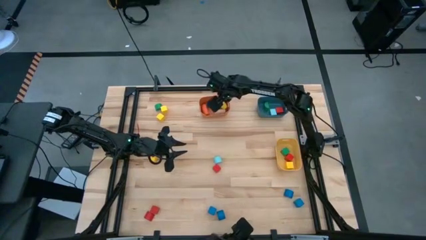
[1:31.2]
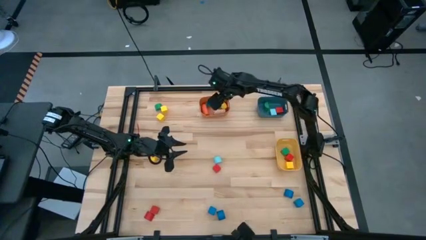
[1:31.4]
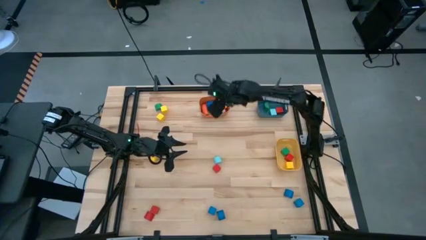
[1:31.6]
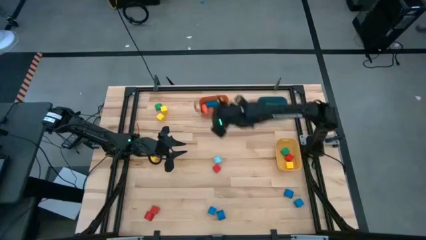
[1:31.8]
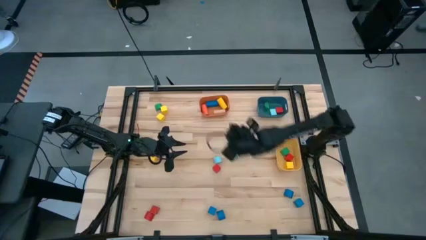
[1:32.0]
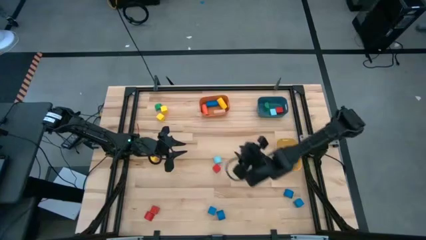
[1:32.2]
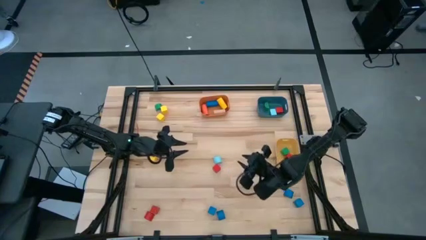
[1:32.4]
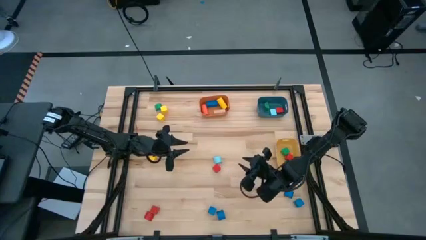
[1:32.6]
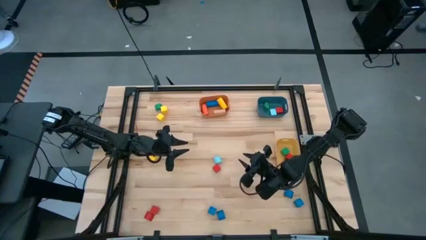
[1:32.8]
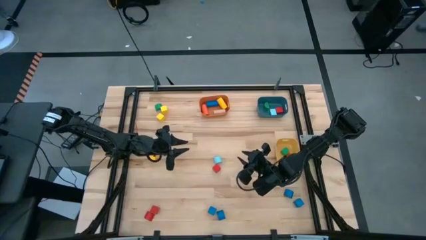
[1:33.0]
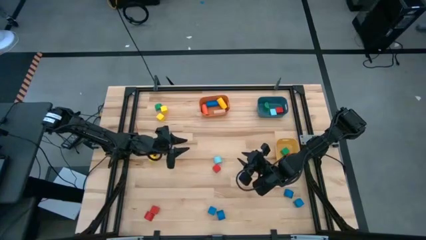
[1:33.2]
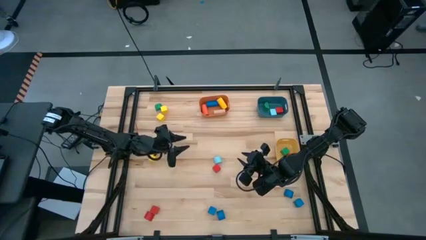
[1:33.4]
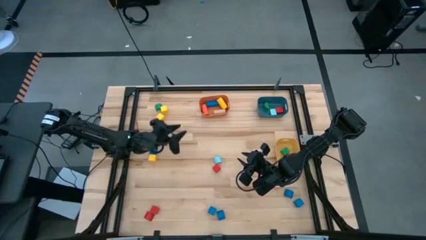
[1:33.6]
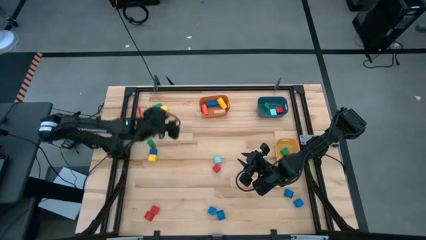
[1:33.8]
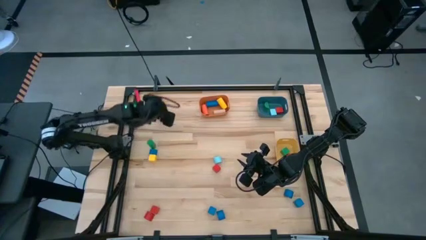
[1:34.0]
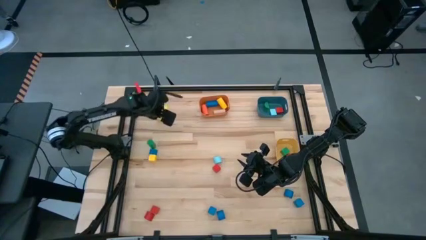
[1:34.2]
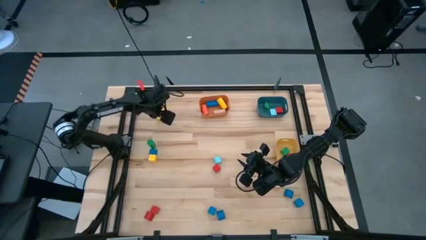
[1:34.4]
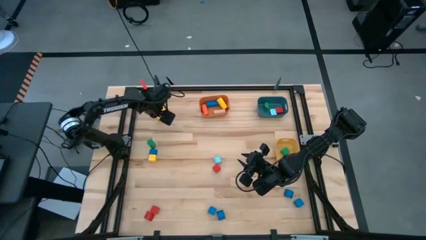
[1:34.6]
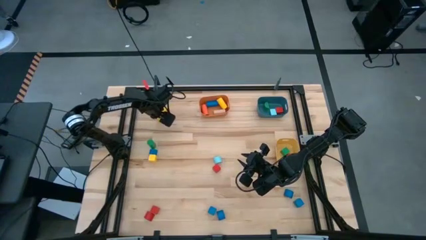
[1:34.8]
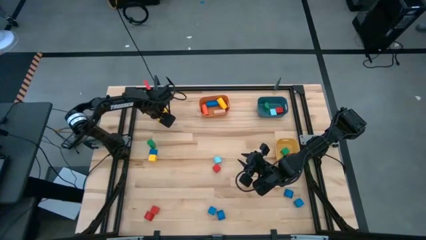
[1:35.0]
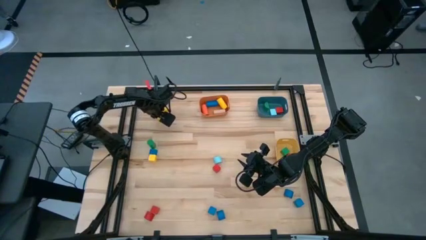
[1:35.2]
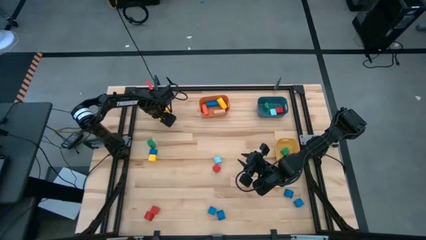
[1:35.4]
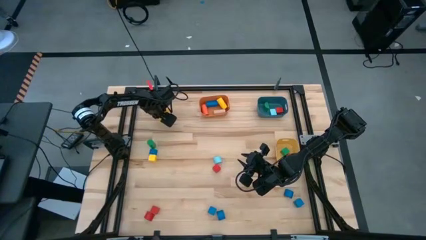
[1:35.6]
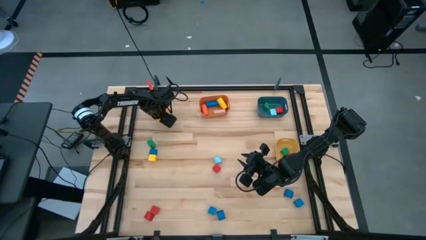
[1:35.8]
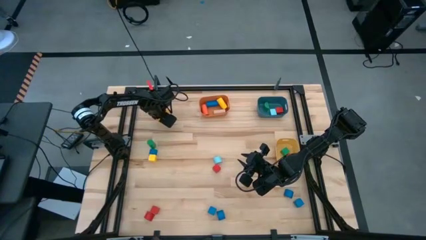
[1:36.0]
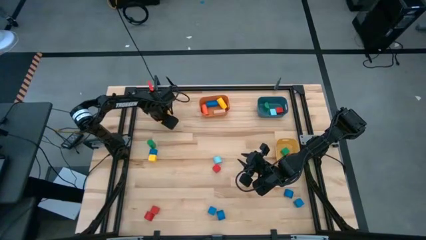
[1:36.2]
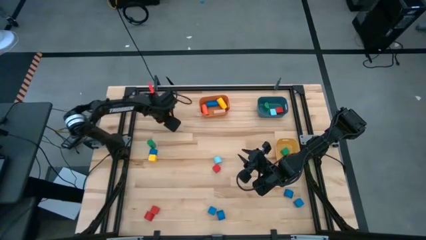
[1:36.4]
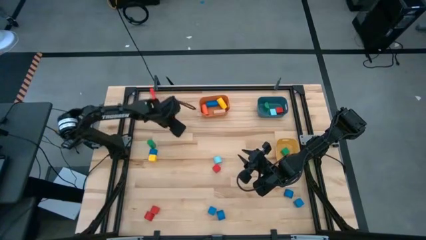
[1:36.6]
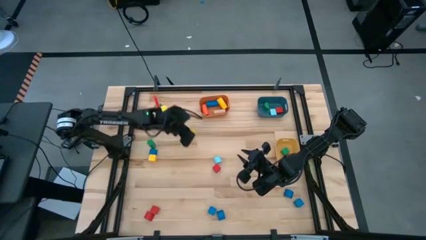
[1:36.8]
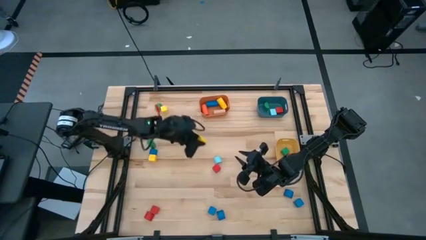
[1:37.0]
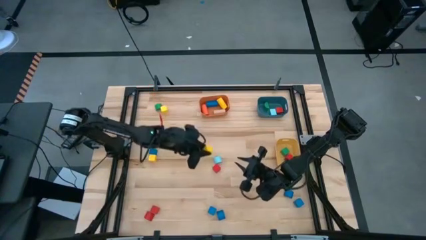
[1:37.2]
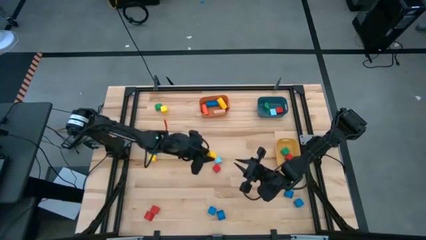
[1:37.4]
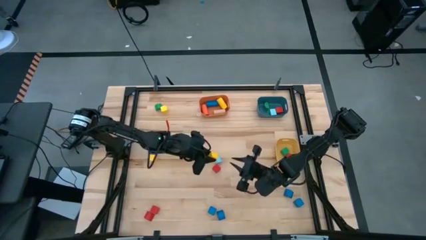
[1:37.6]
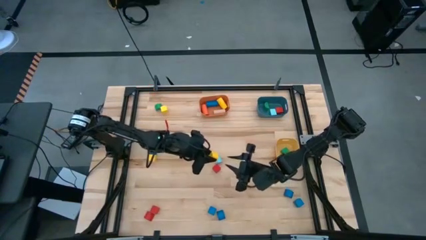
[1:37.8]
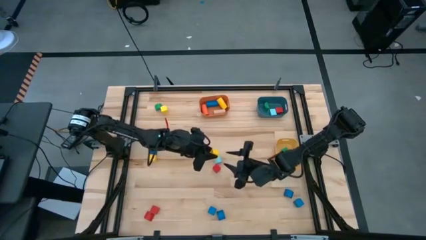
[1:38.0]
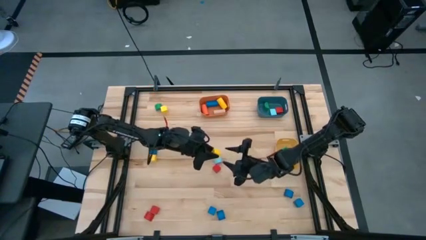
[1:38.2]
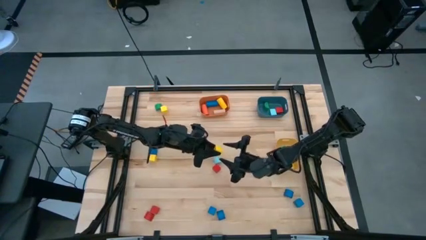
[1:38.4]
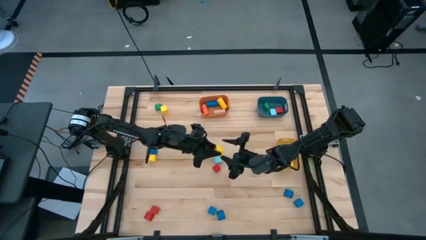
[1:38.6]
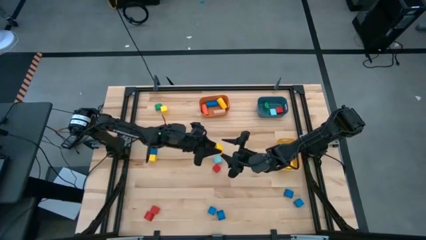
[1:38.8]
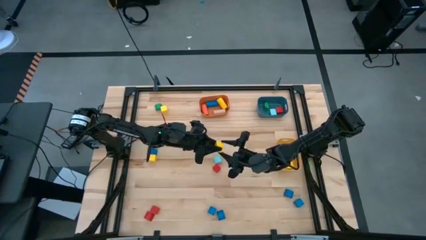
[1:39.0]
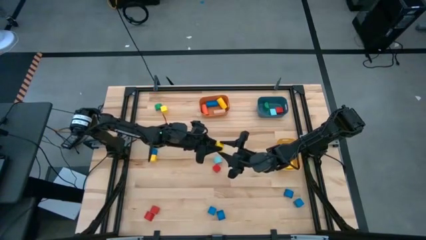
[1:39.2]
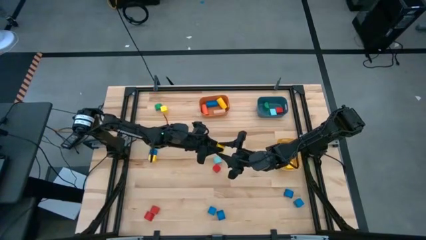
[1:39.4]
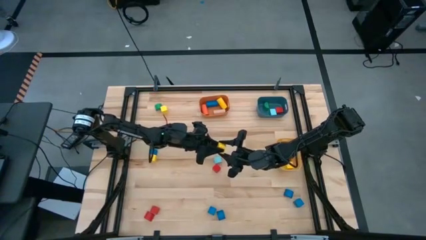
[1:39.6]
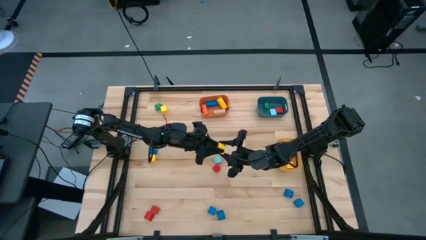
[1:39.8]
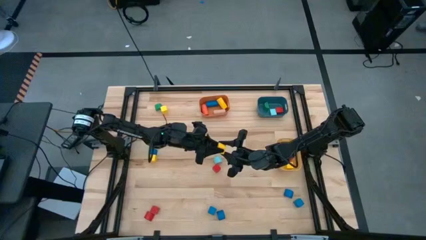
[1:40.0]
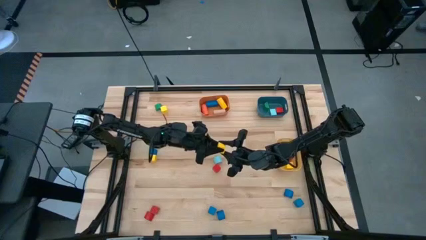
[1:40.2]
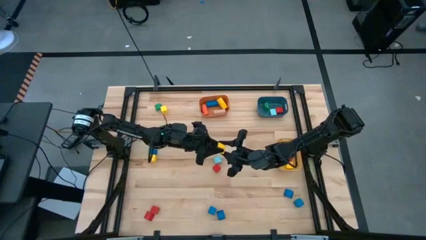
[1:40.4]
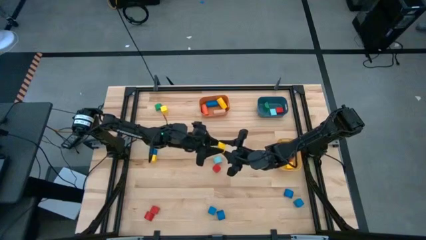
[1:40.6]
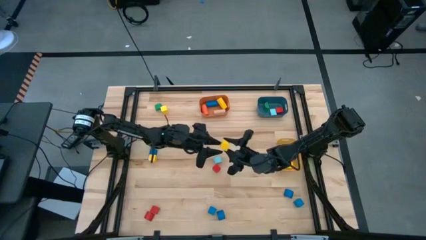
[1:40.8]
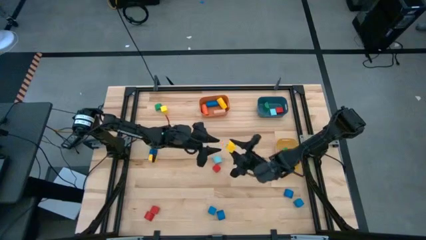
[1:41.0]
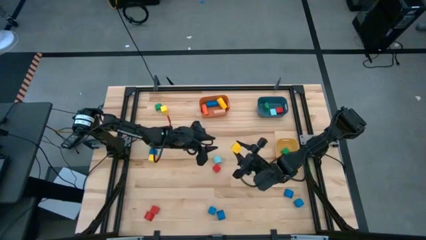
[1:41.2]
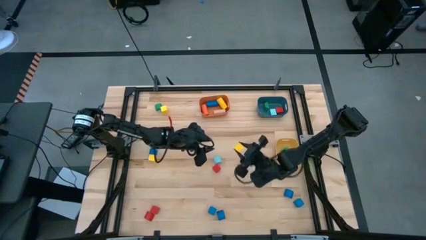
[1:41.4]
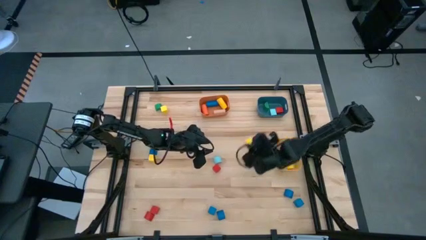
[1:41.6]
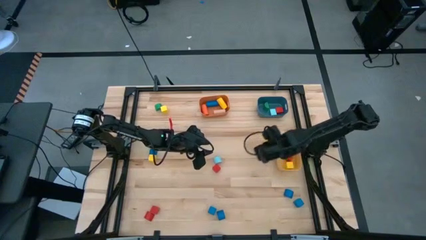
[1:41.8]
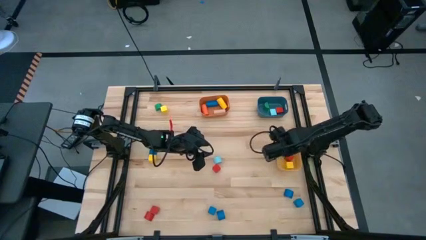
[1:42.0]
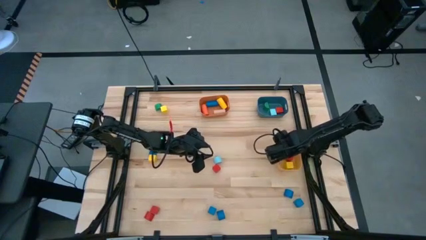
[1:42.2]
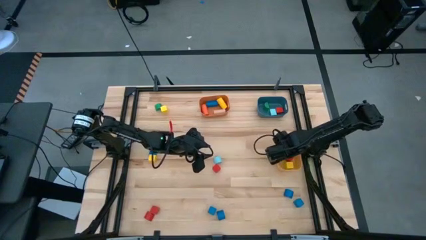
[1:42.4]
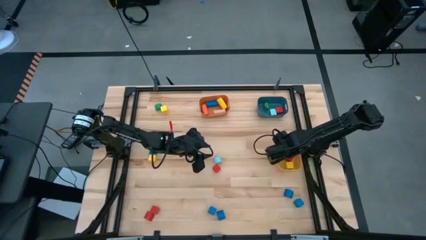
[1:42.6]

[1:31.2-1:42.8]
Task: Sort blocks by size
Put the yellow cube block into the yellow bin

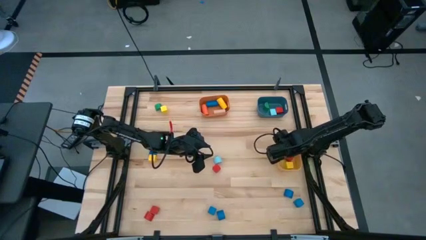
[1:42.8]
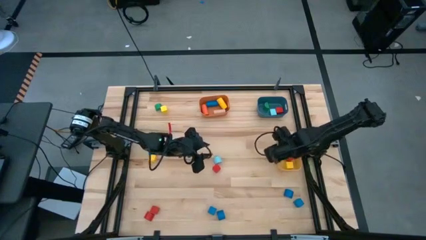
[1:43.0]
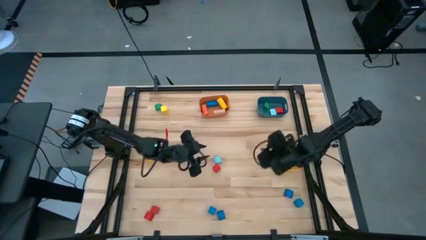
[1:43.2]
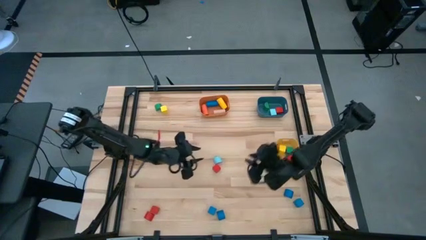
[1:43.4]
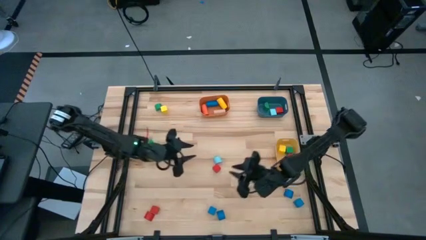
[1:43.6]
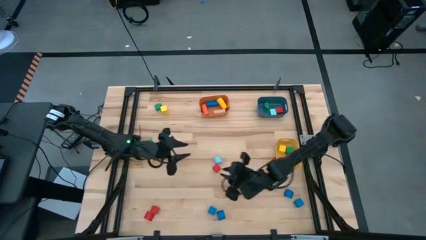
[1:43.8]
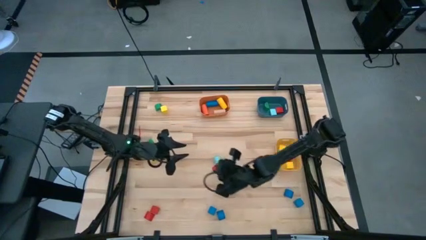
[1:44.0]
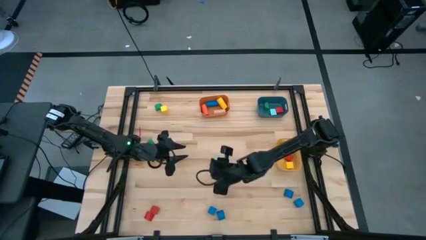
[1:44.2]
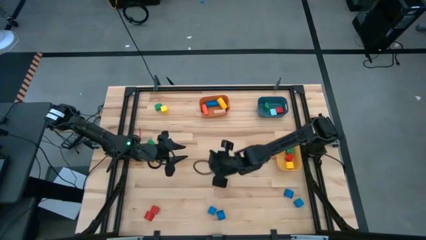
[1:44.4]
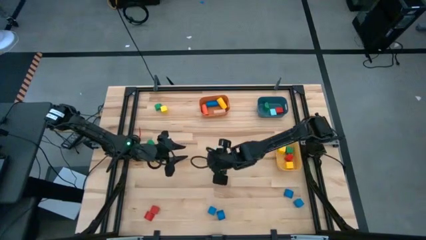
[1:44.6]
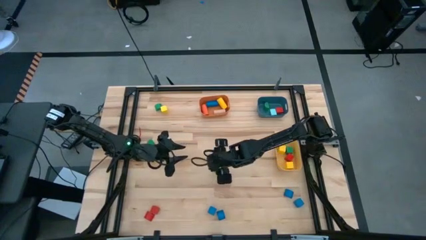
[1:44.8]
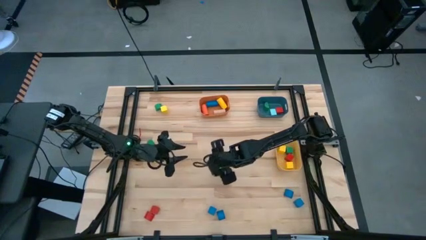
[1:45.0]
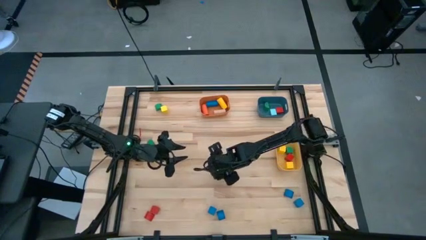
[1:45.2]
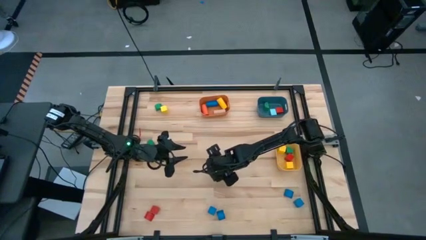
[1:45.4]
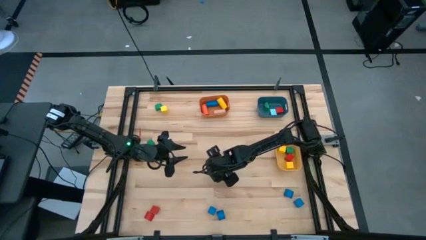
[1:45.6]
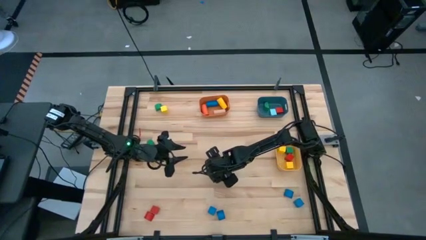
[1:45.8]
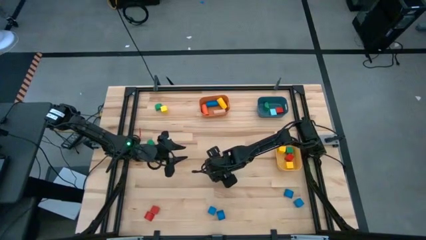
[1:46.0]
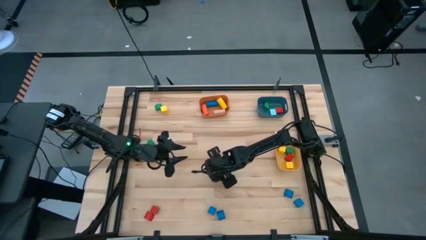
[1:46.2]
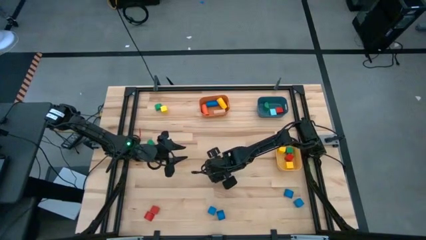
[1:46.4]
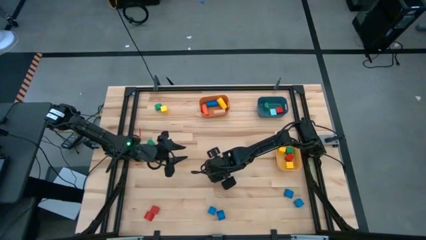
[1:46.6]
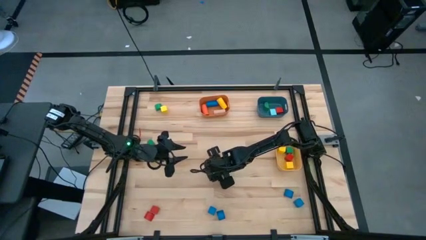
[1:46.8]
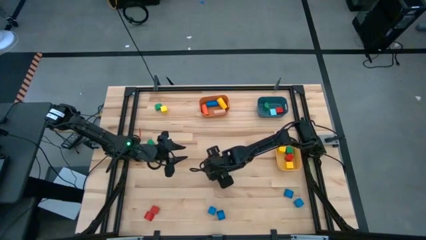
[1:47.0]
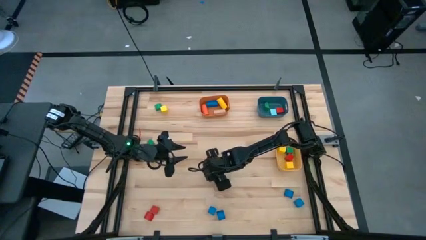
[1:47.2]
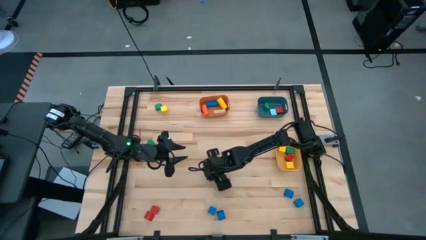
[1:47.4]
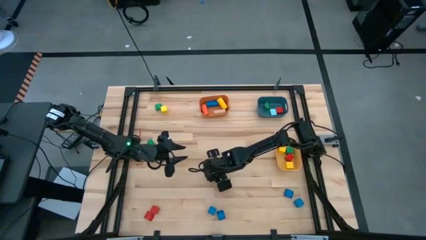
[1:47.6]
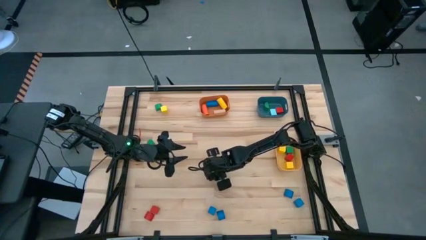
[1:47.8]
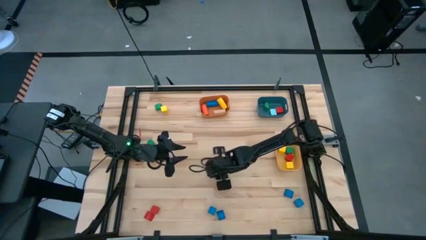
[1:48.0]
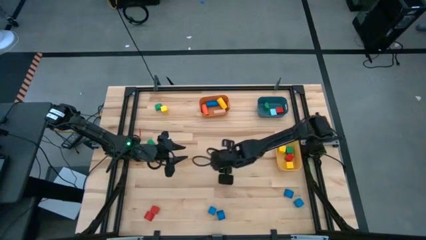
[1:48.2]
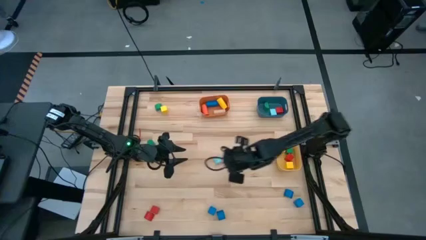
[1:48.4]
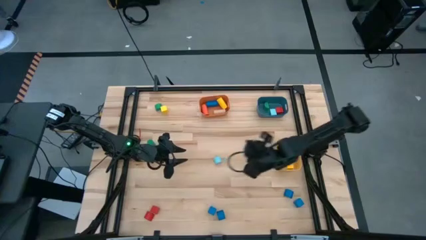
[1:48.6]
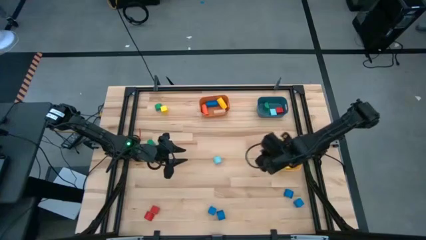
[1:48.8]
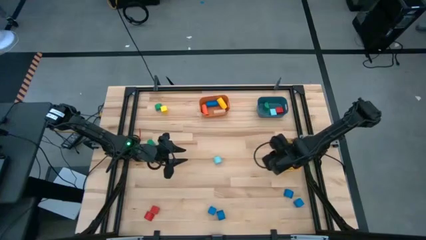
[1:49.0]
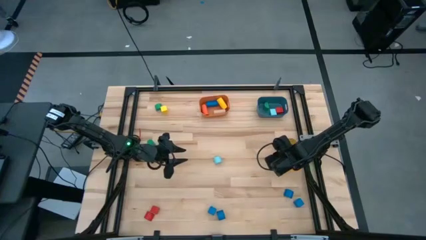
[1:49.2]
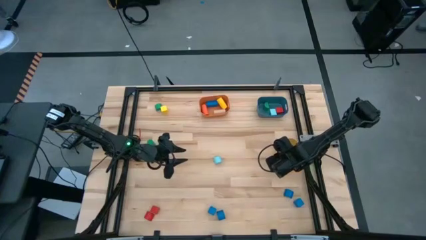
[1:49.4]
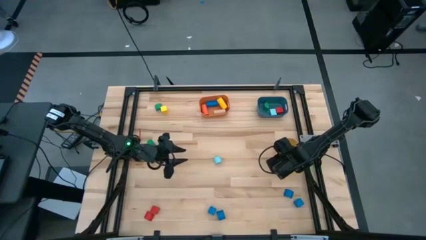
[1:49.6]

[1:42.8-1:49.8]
Put the red cube block into the yellow bin
